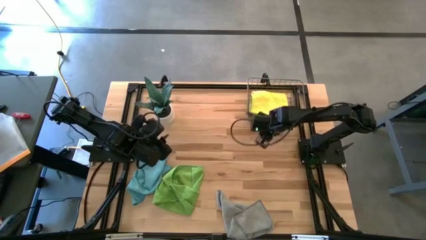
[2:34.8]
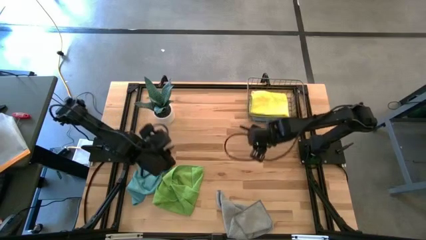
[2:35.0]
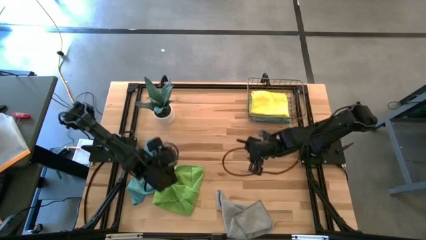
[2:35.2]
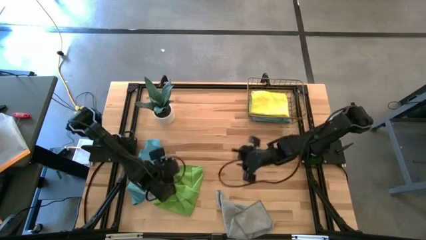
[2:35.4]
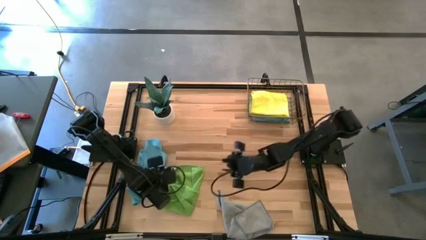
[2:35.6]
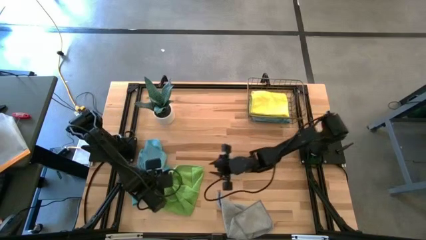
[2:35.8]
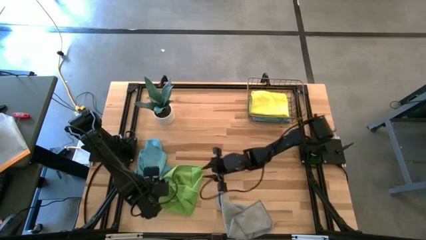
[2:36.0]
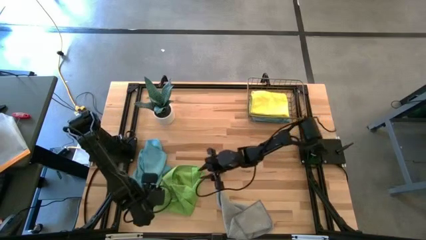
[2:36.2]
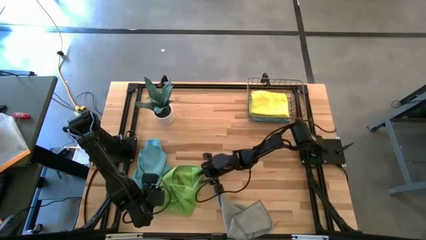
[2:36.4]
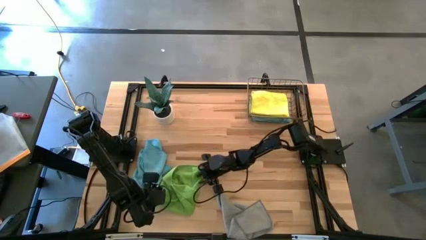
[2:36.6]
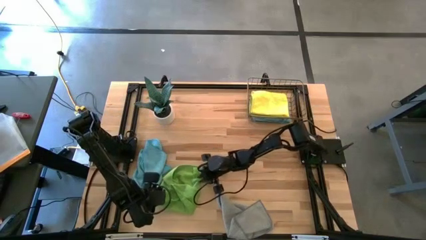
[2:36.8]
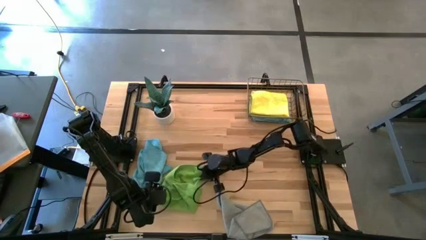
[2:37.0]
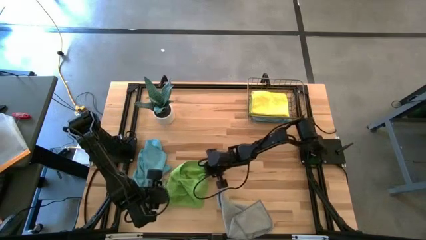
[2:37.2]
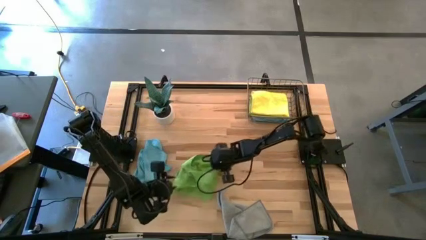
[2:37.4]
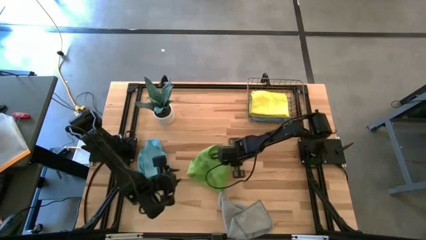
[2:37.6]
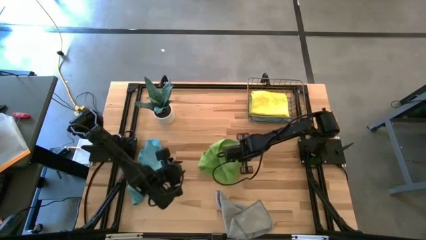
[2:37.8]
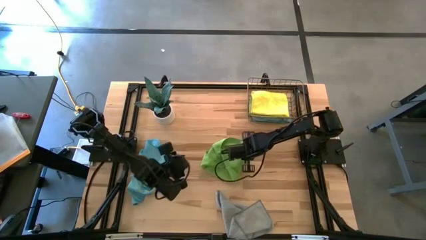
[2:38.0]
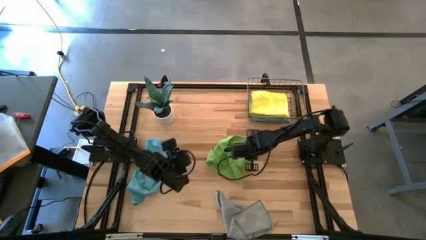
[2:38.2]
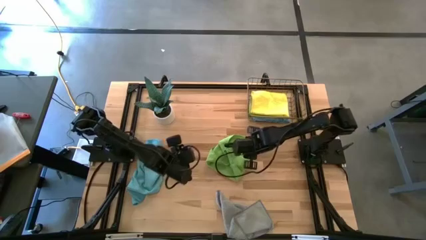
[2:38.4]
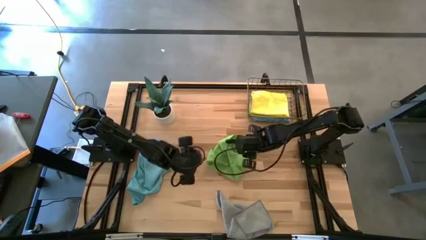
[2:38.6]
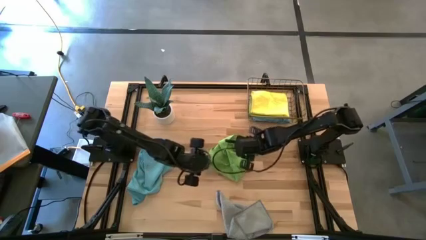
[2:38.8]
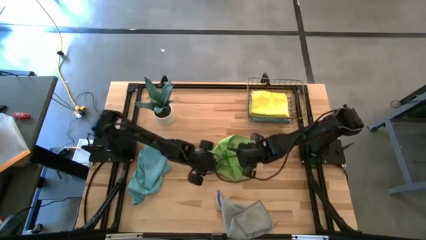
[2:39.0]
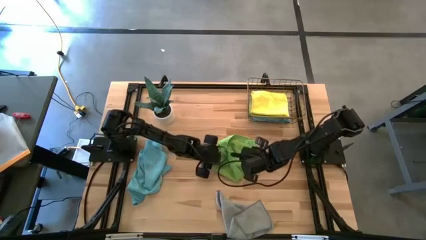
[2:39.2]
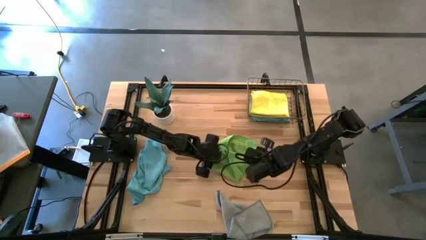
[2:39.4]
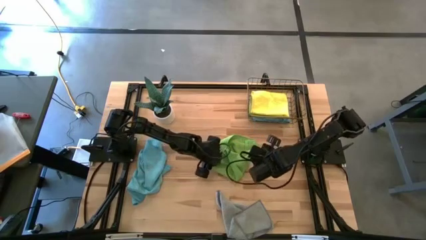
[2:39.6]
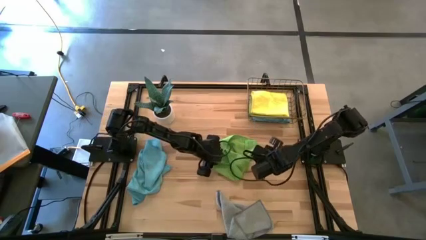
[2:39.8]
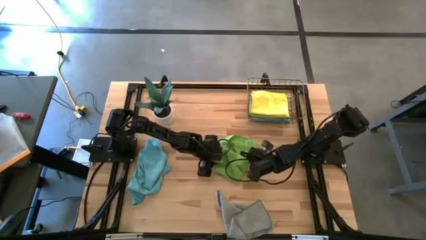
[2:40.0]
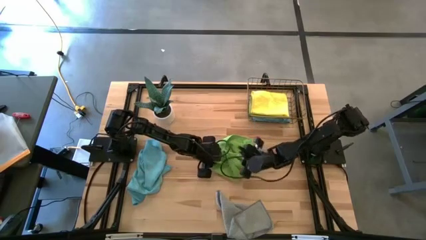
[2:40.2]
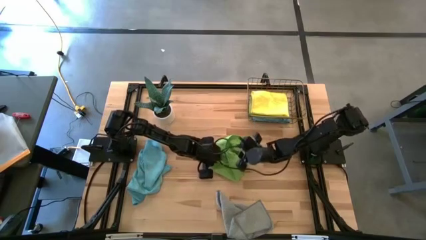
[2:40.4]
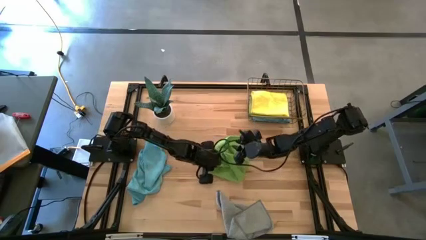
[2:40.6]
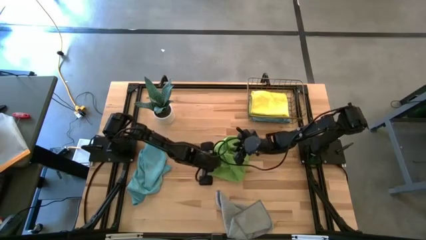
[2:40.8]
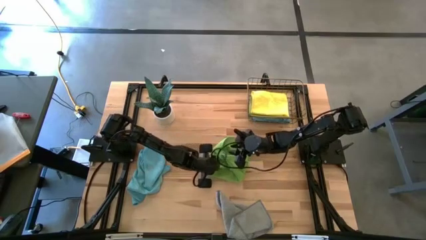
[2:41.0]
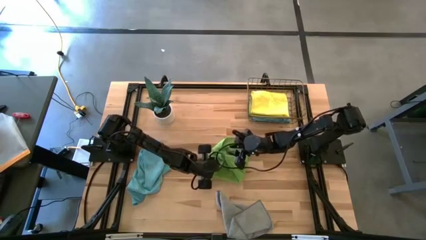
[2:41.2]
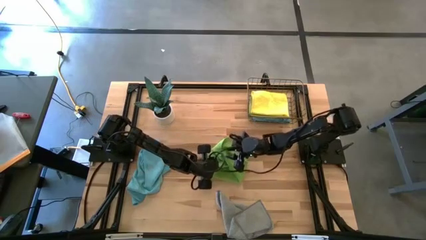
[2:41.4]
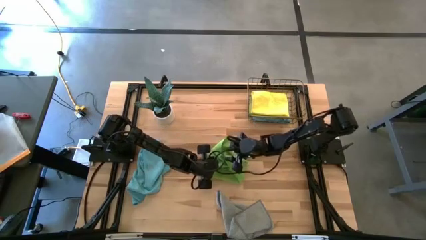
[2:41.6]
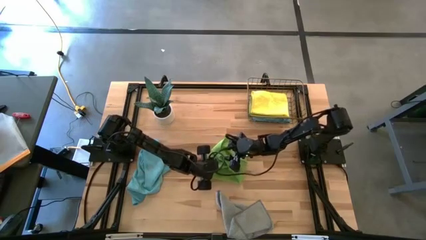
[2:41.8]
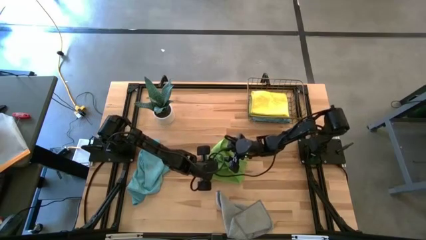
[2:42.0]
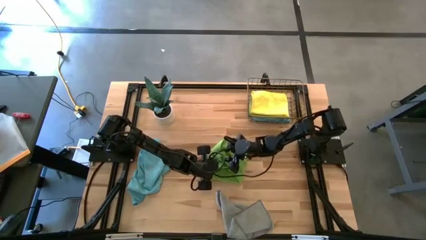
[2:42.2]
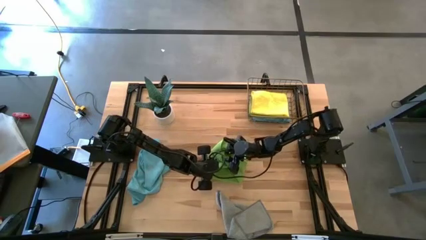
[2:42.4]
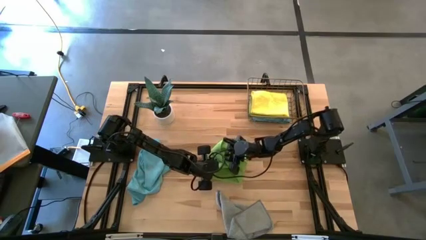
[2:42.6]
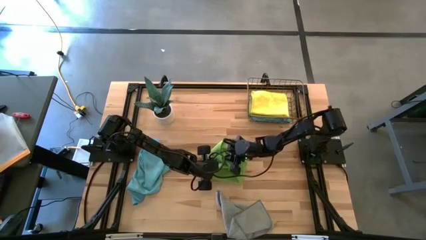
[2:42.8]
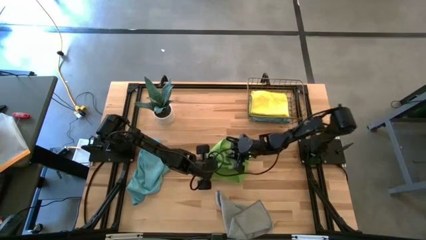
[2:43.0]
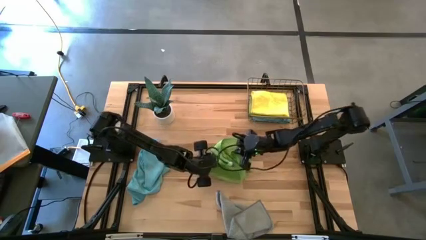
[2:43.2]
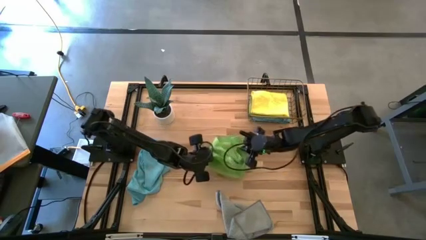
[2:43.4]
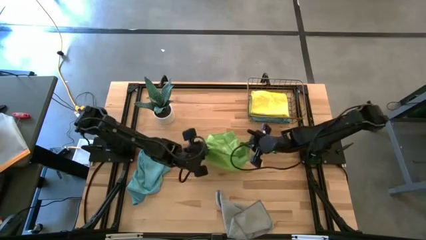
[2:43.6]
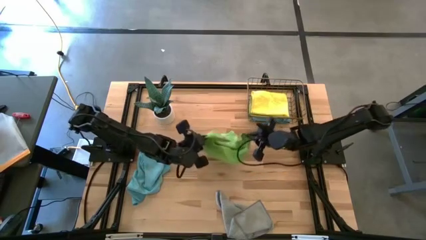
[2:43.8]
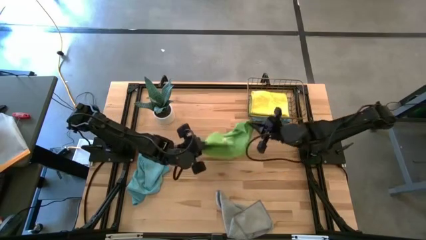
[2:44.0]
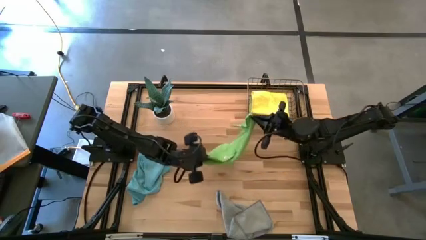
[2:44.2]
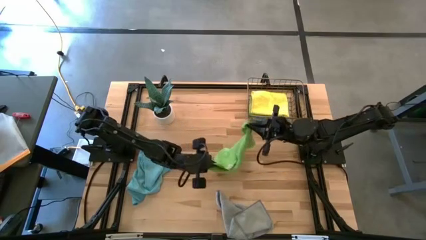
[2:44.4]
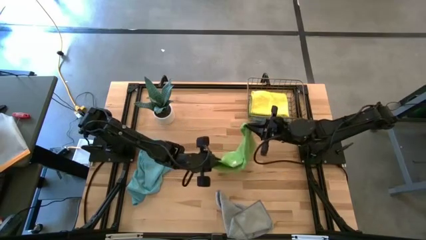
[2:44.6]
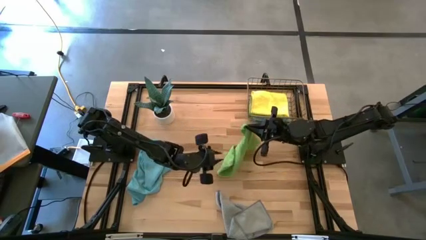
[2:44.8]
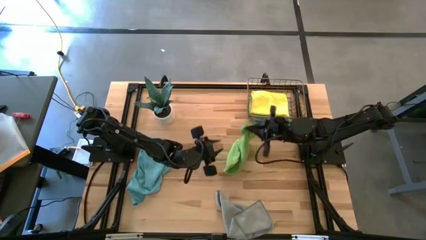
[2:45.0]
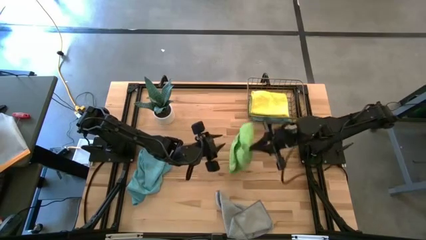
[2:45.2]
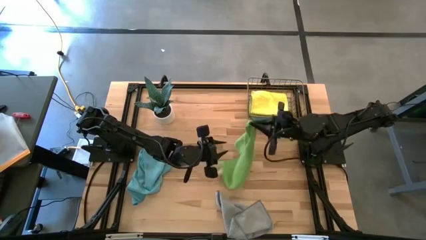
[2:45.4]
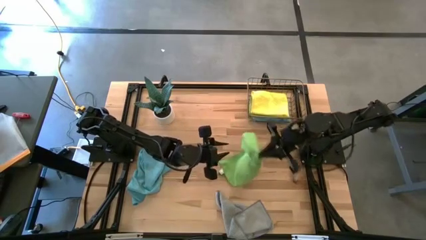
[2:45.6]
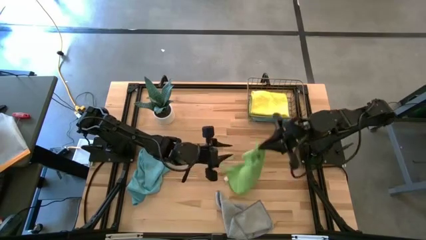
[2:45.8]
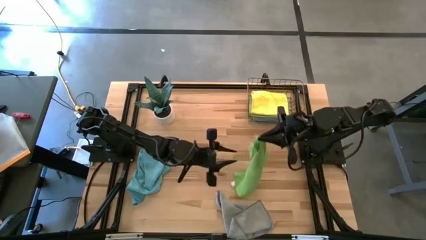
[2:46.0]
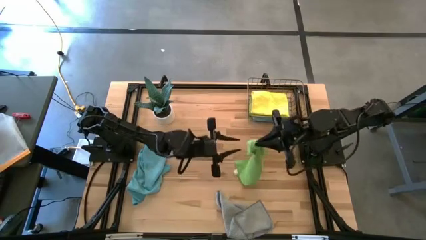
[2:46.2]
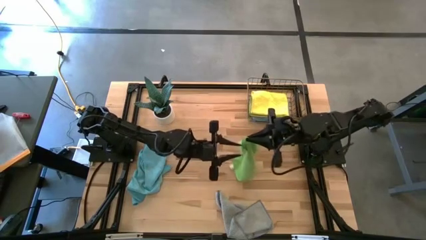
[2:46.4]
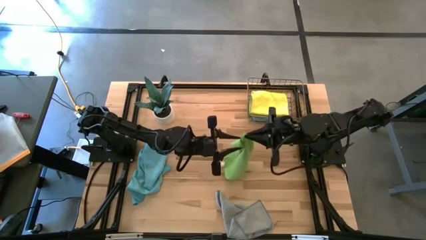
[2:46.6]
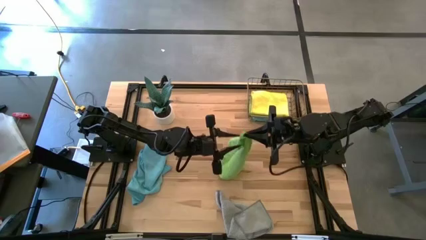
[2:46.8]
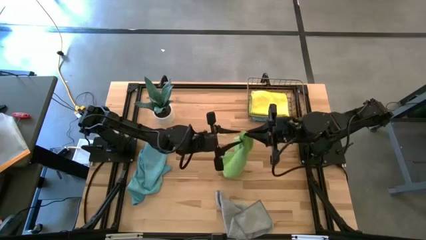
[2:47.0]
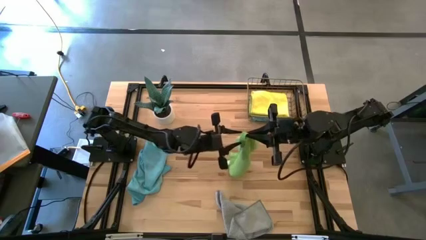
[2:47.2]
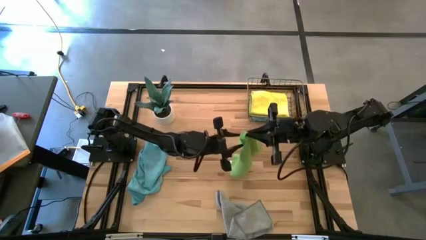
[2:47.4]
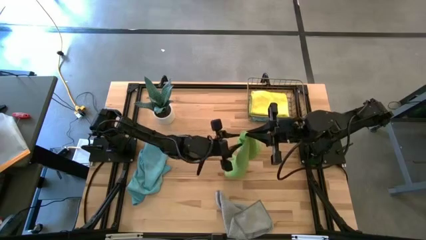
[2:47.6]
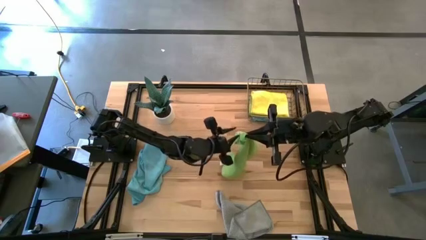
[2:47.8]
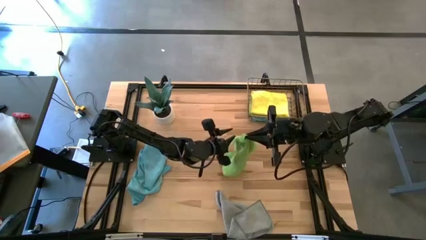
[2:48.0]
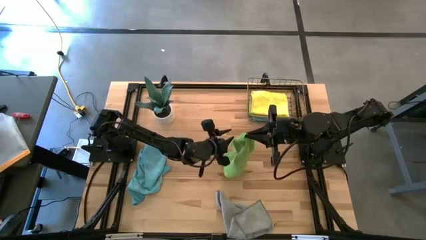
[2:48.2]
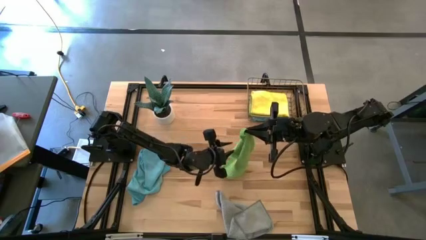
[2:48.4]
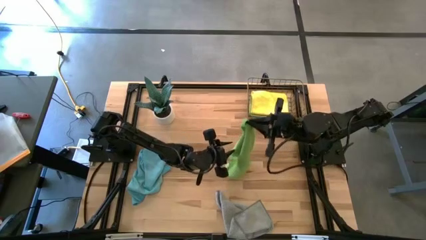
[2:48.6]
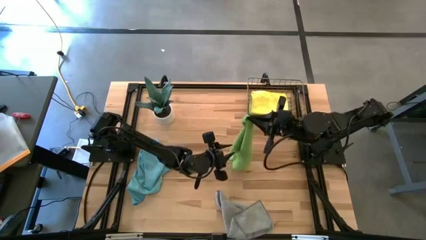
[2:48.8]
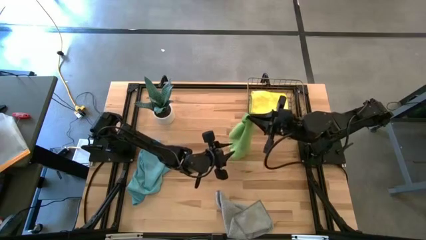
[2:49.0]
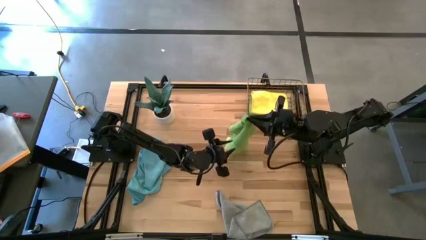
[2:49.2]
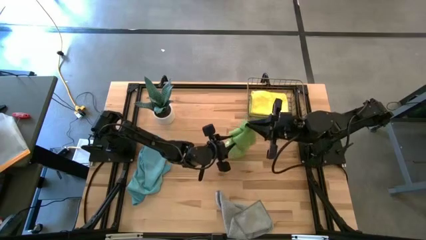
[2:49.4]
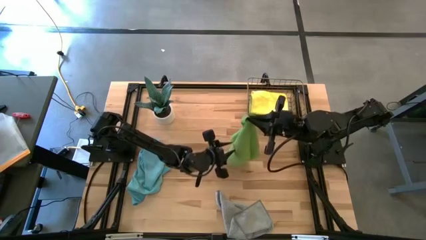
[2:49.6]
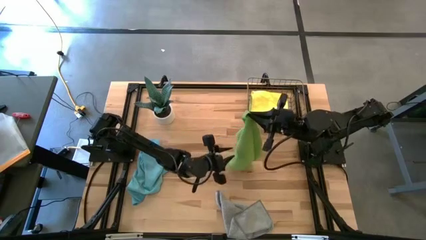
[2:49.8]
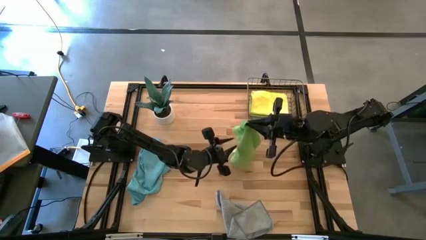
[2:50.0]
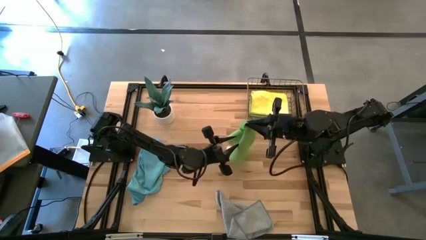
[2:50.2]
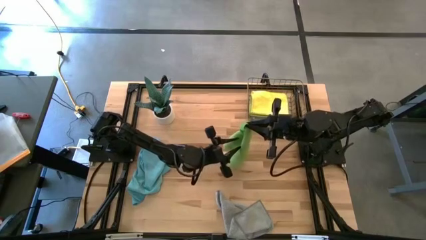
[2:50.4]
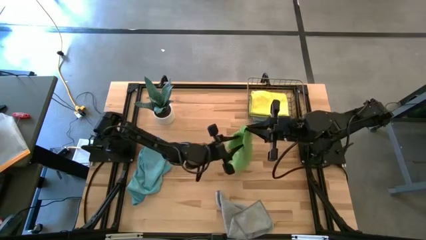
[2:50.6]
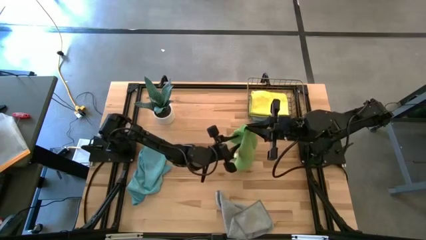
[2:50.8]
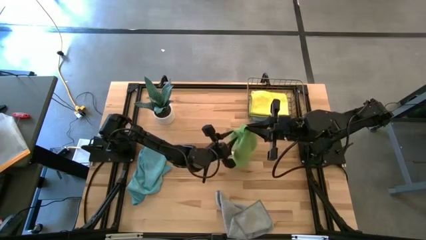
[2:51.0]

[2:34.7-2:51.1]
Task: Fold microfiber towels
Fold the green towel
